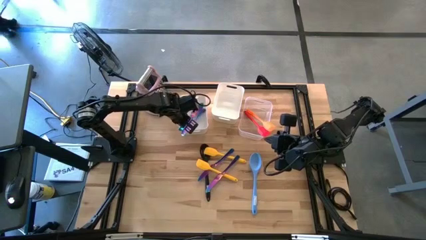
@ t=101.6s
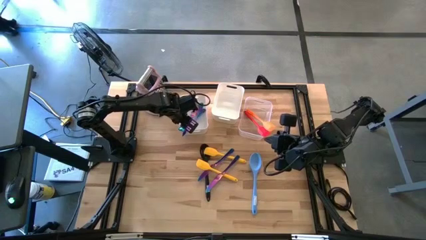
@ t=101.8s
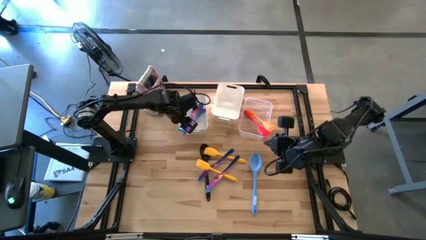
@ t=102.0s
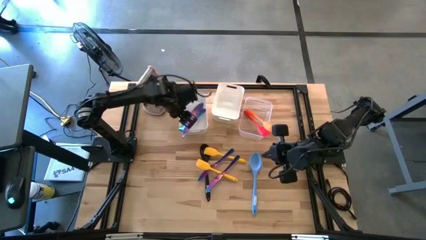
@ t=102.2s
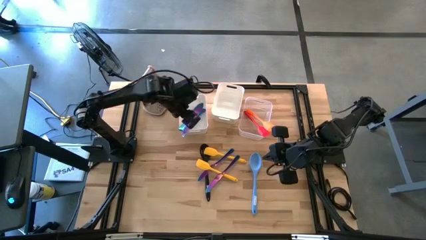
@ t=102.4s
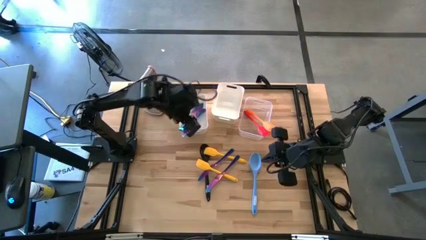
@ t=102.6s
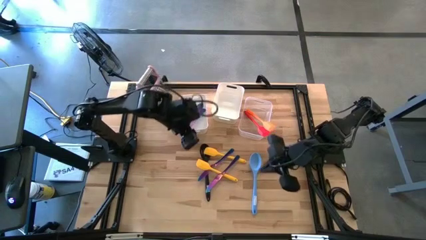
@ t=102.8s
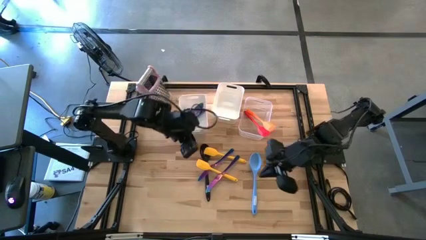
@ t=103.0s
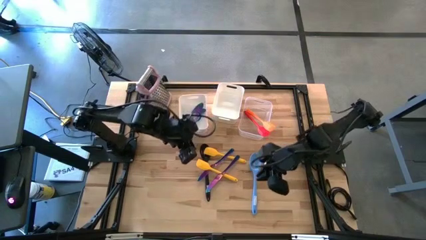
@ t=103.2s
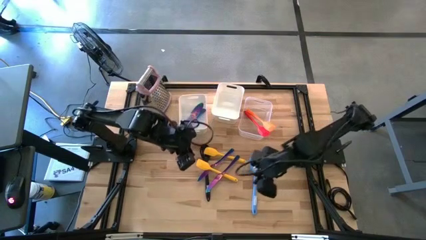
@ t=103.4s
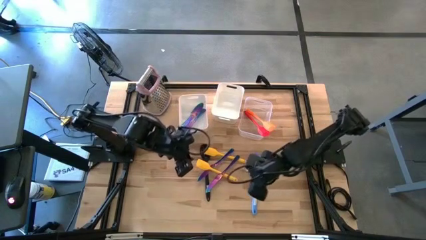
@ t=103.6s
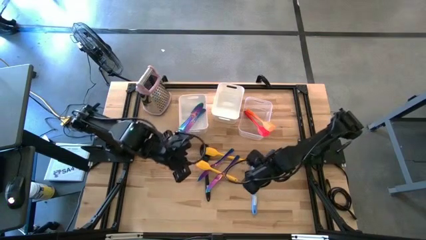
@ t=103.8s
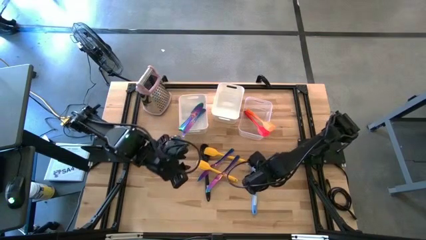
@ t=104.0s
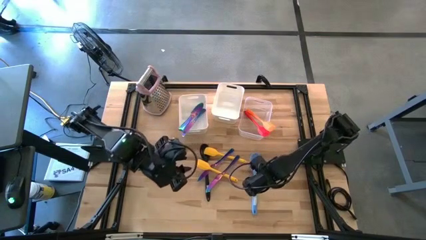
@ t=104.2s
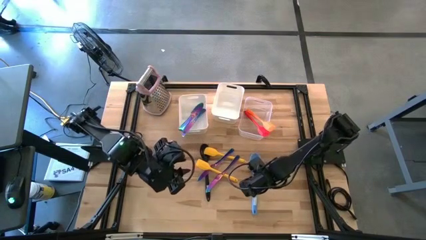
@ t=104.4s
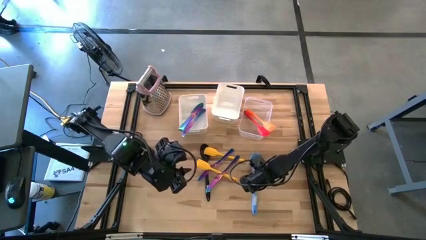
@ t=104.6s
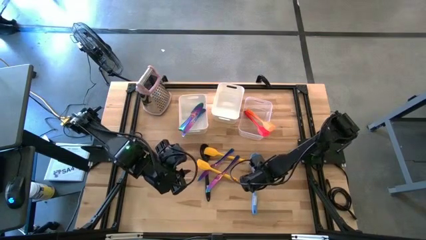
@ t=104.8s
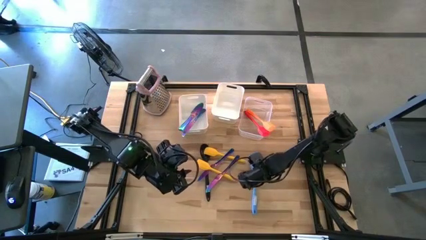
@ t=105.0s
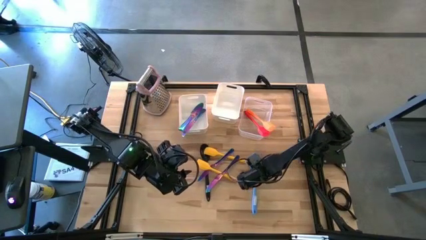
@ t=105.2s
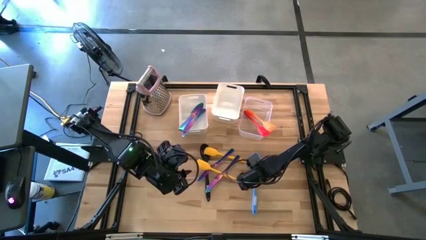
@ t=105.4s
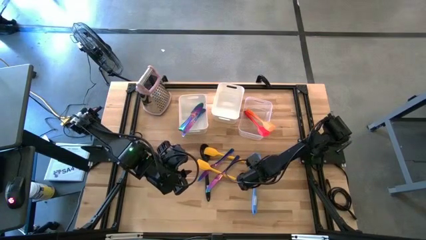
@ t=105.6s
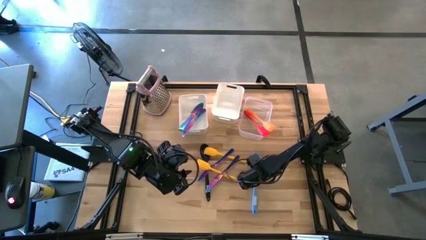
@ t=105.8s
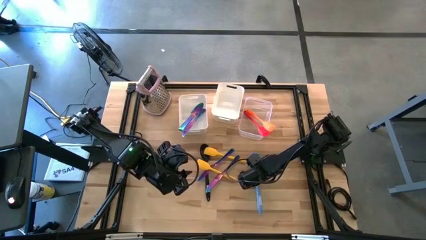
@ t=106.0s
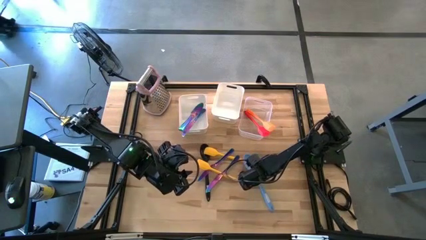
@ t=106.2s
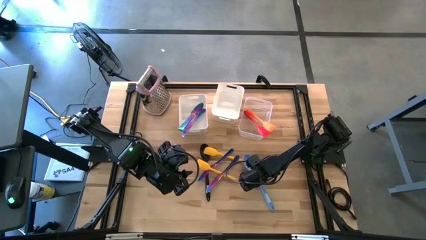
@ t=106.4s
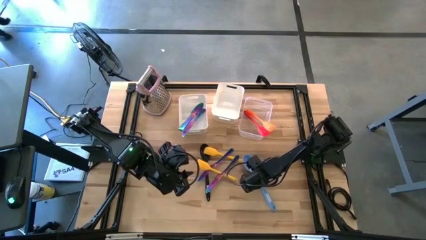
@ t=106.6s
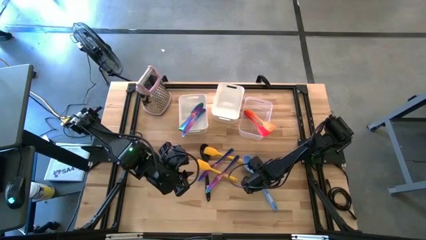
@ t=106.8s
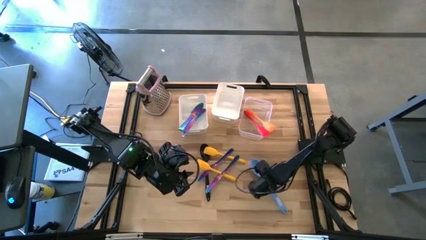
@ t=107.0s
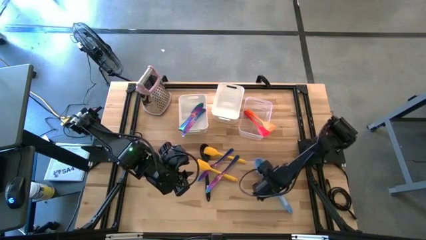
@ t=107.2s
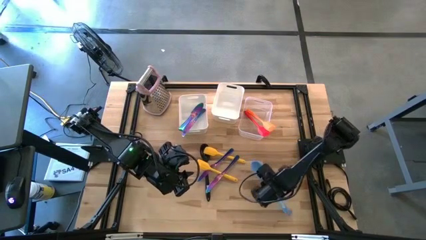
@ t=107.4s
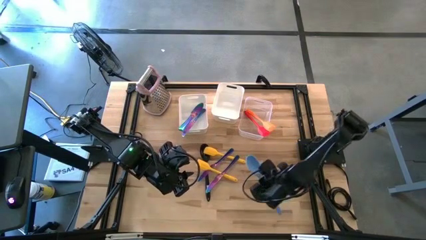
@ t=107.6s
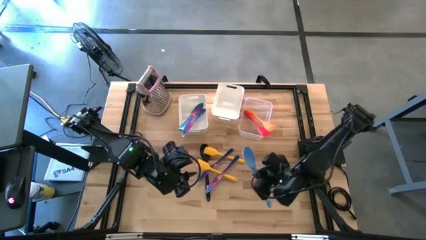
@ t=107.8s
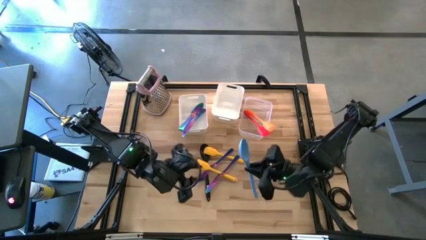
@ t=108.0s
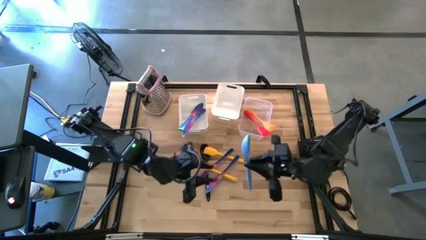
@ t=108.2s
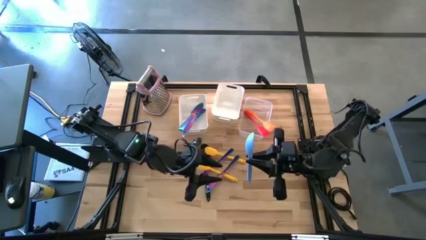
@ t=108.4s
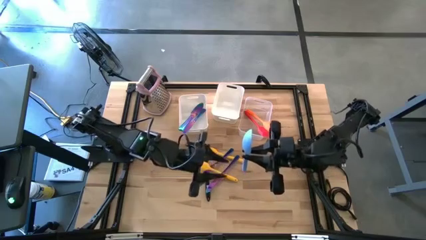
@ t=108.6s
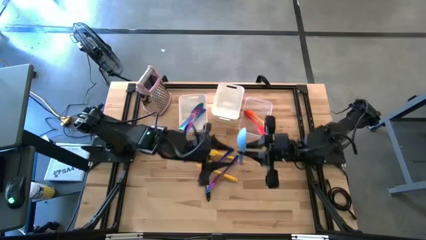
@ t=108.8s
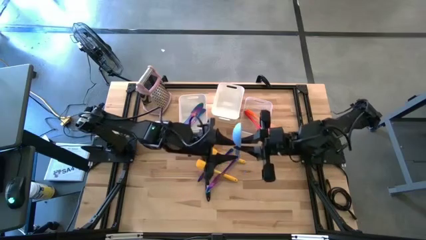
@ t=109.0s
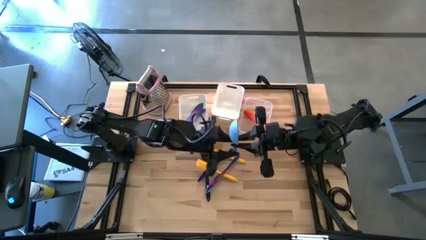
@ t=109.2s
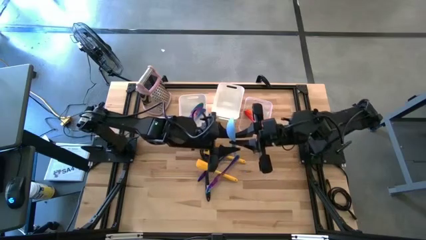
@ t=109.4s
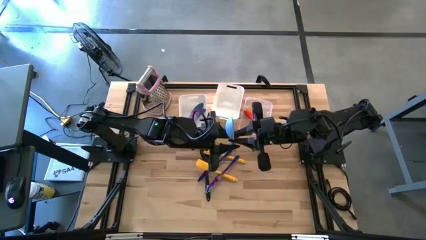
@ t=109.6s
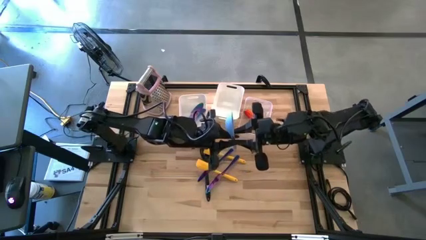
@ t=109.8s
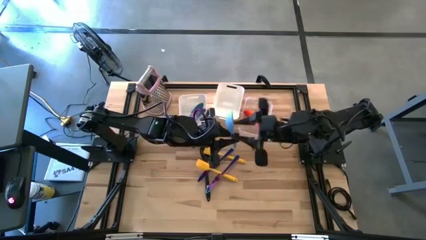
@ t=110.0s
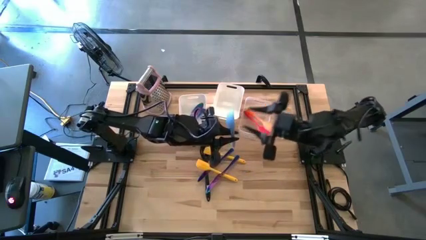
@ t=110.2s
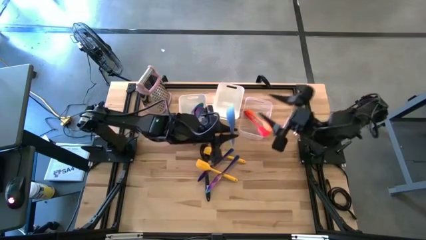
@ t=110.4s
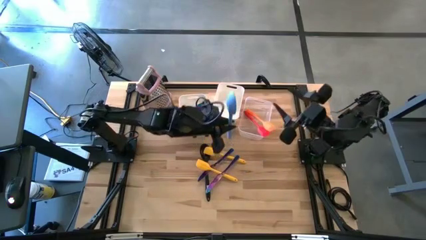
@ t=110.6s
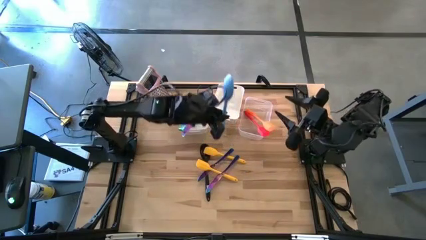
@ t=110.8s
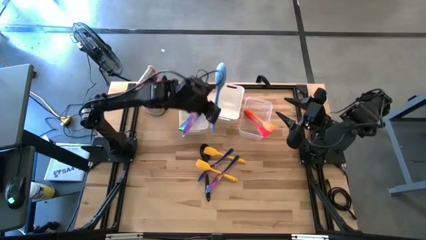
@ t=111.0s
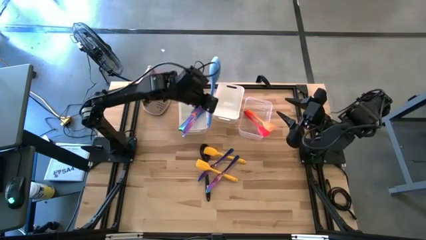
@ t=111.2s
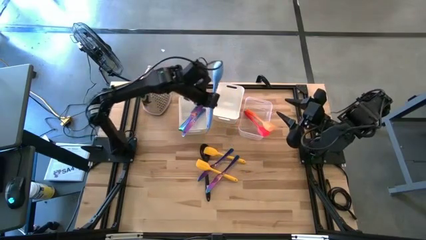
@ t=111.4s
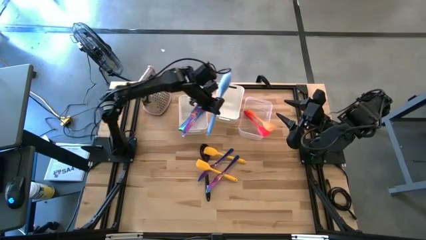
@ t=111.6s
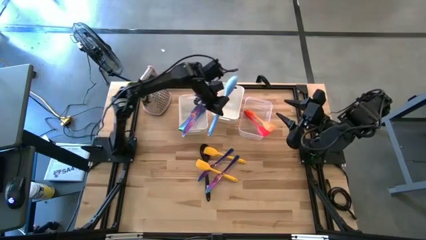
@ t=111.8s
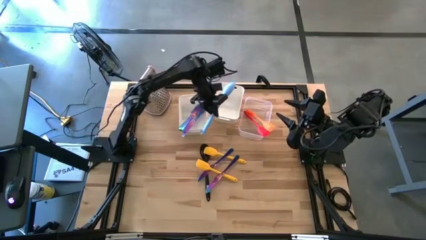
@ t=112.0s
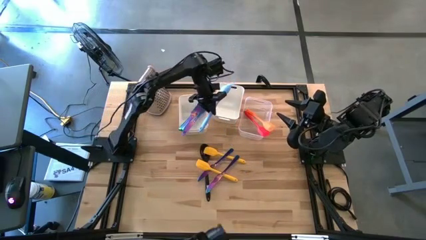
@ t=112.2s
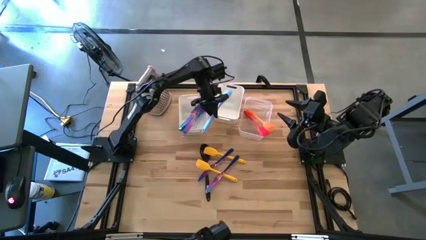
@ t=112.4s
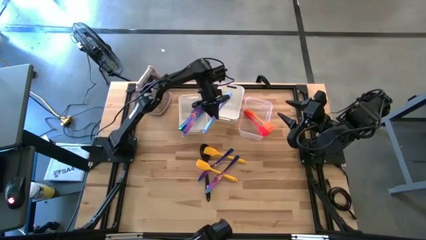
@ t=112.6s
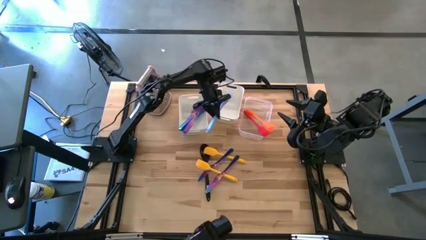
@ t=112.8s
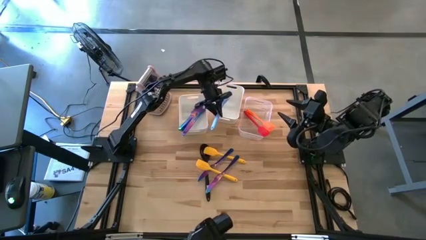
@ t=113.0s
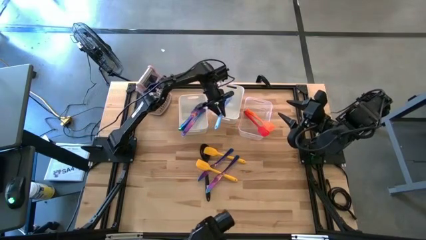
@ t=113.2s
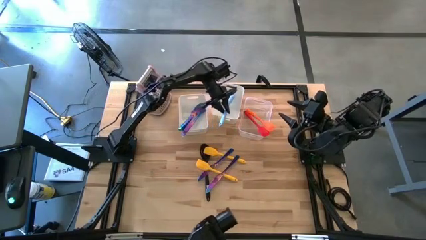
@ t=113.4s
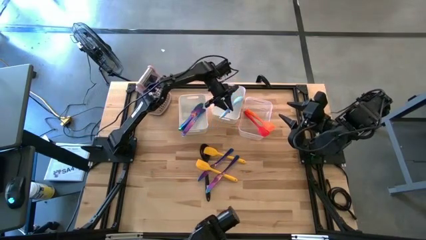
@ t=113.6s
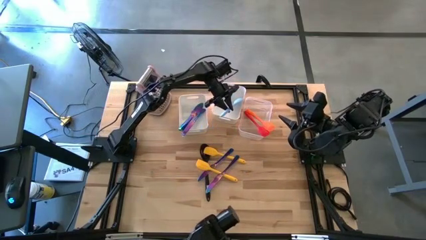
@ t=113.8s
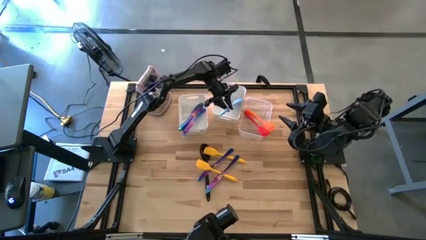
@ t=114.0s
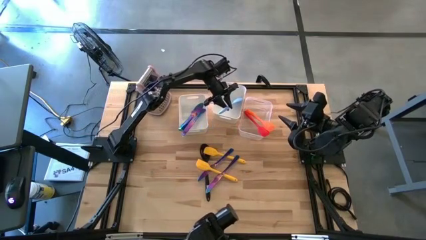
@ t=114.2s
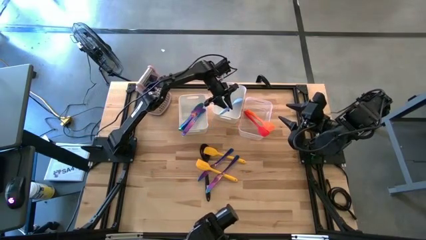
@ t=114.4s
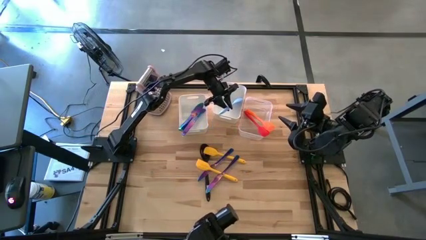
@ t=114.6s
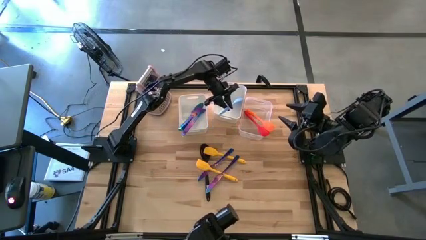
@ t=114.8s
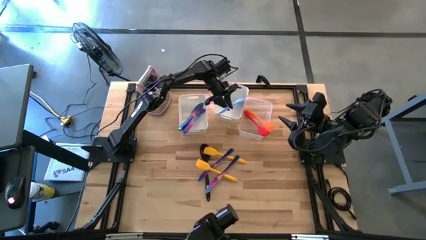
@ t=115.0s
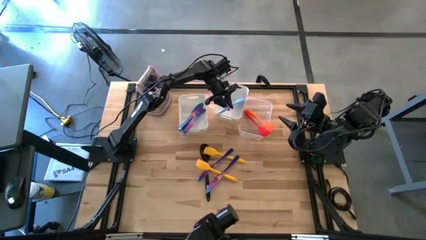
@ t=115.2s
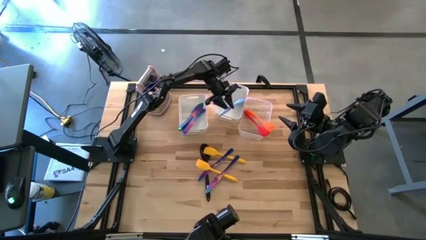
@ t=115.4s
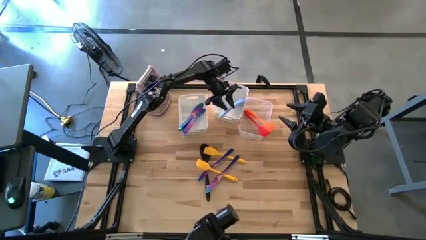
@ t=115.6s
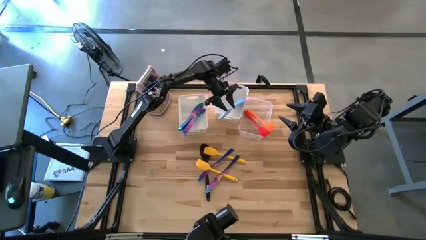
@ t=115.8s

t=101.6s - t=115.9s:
Task: Pick & Place Kitchen Items
Put the blue serving spoon into the right white bin
